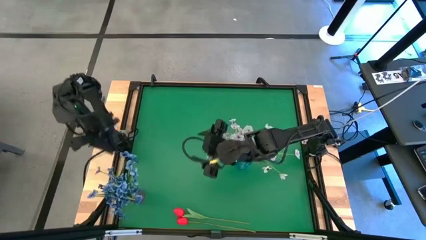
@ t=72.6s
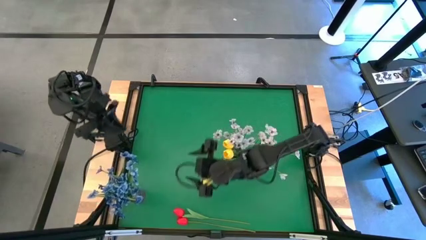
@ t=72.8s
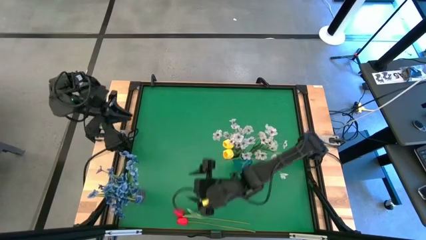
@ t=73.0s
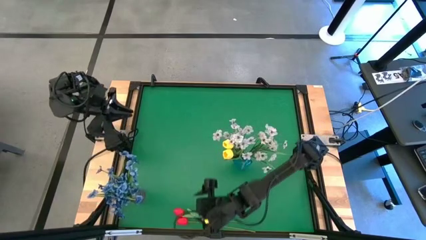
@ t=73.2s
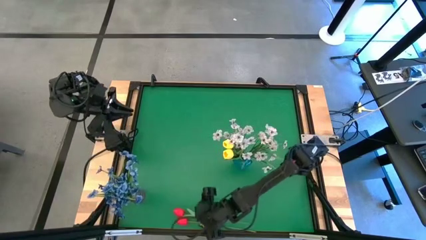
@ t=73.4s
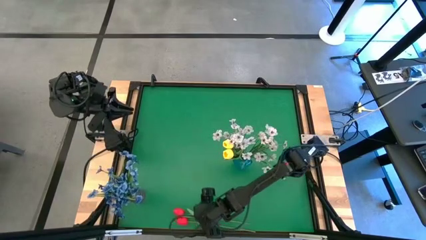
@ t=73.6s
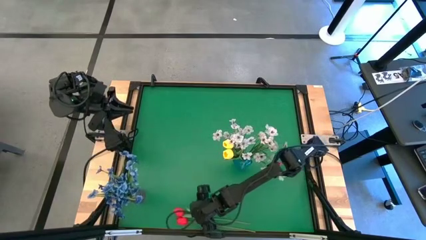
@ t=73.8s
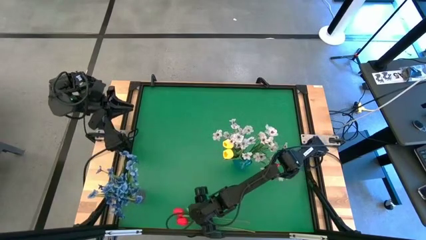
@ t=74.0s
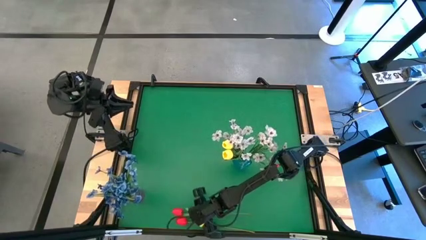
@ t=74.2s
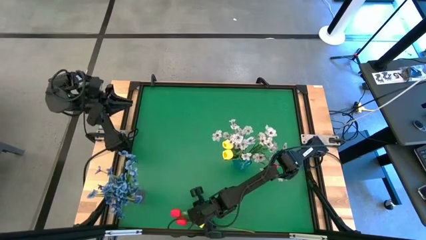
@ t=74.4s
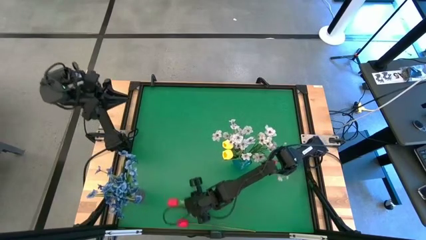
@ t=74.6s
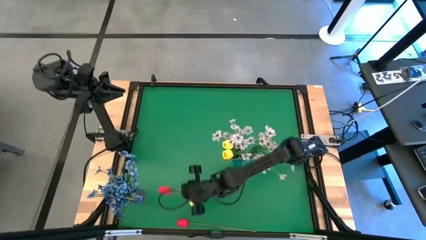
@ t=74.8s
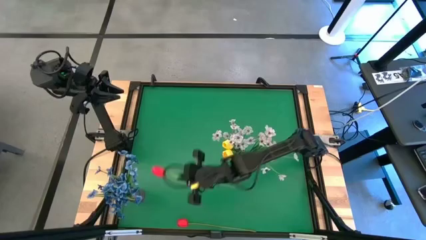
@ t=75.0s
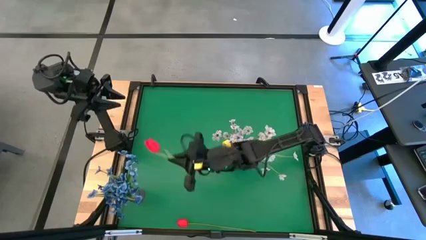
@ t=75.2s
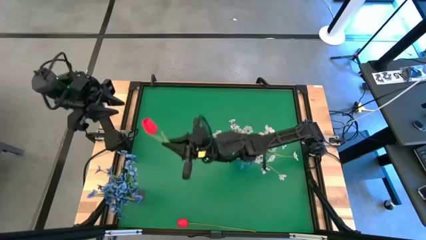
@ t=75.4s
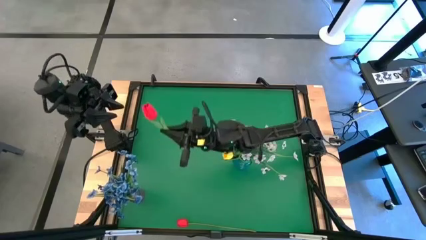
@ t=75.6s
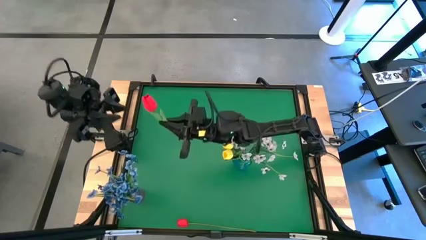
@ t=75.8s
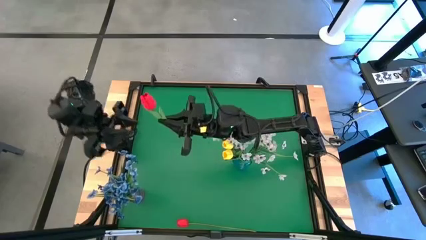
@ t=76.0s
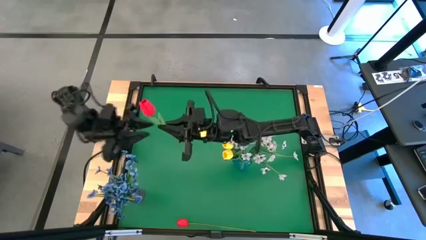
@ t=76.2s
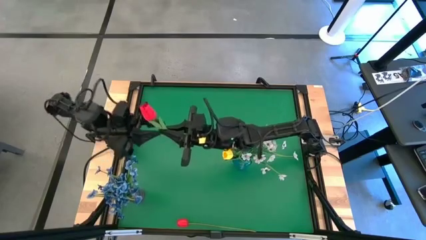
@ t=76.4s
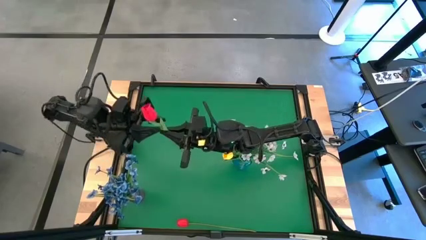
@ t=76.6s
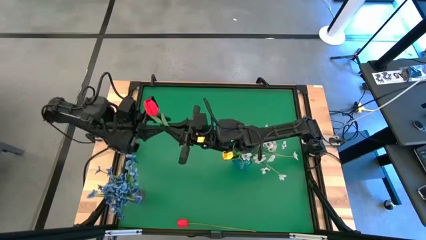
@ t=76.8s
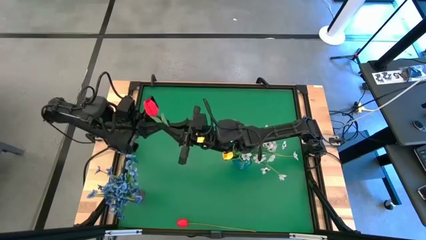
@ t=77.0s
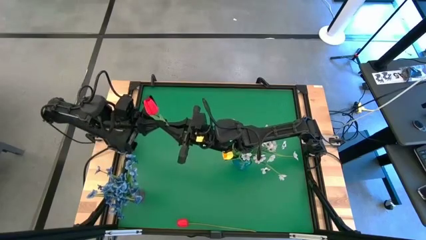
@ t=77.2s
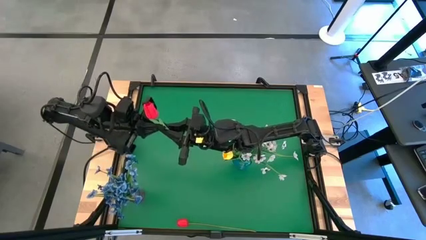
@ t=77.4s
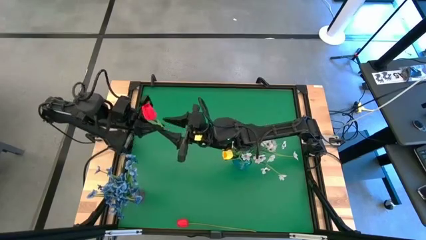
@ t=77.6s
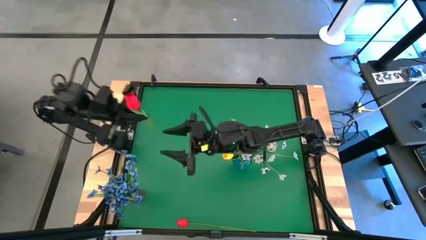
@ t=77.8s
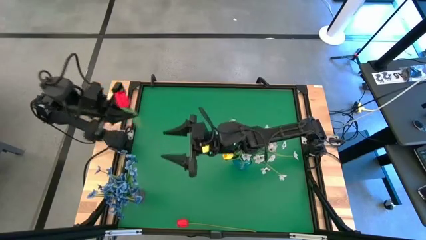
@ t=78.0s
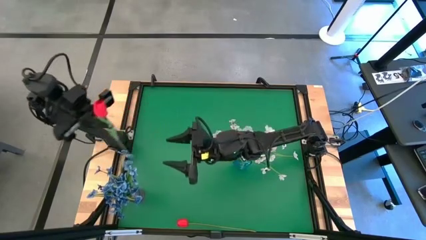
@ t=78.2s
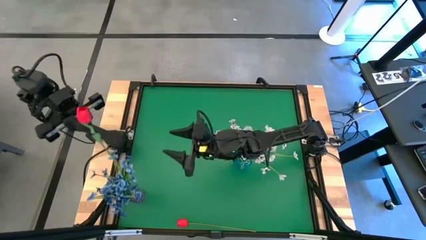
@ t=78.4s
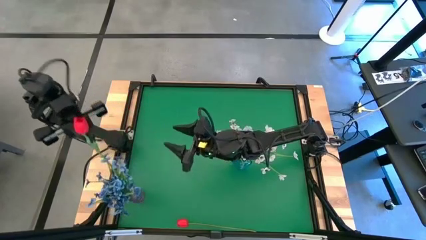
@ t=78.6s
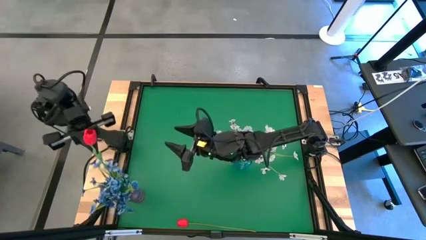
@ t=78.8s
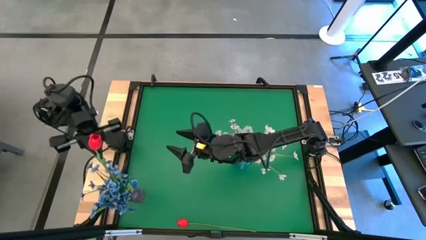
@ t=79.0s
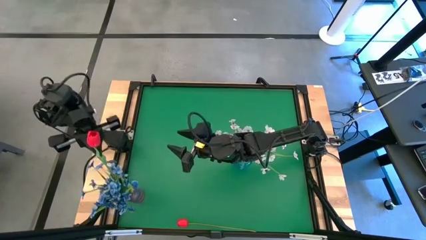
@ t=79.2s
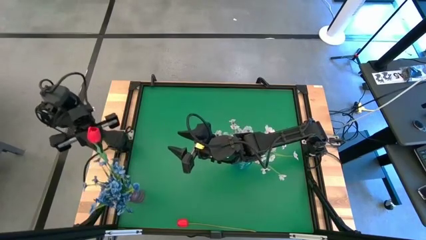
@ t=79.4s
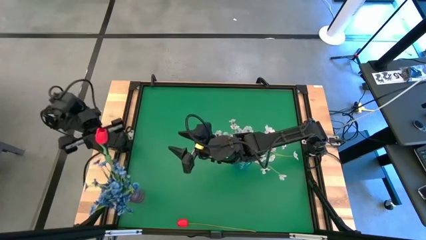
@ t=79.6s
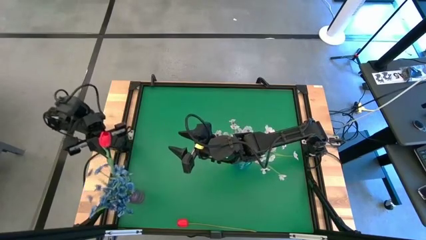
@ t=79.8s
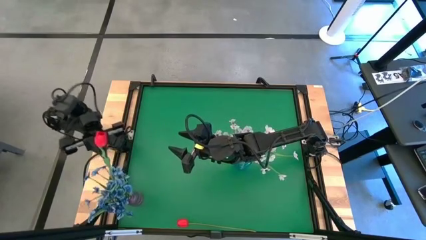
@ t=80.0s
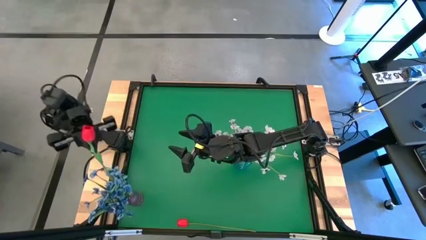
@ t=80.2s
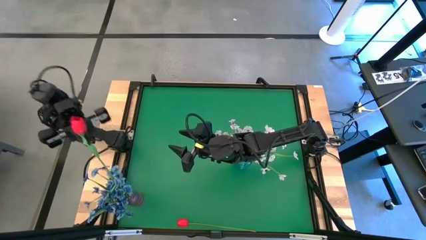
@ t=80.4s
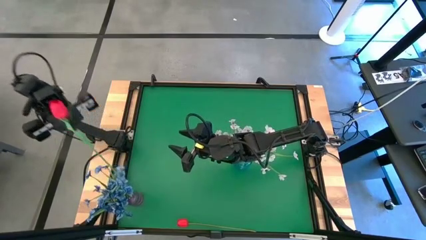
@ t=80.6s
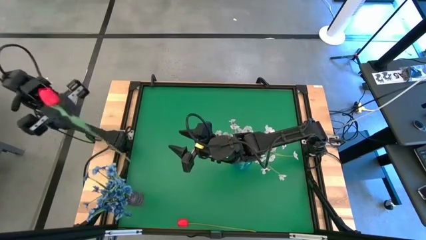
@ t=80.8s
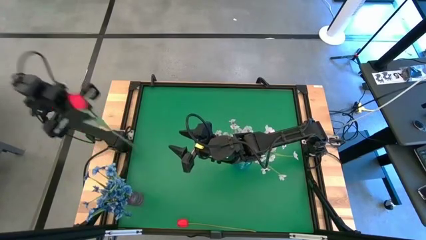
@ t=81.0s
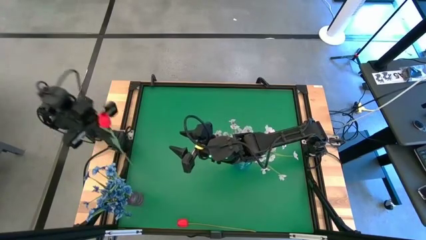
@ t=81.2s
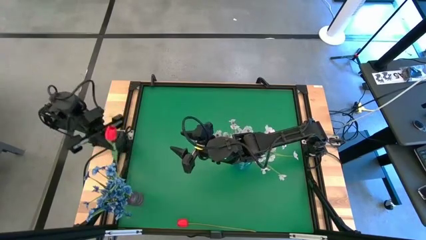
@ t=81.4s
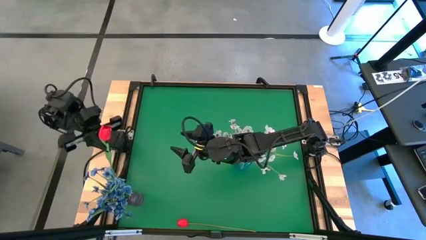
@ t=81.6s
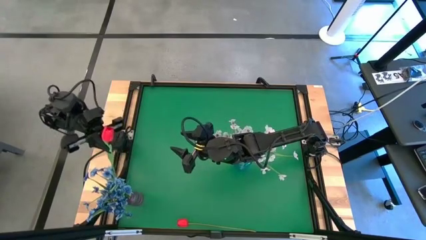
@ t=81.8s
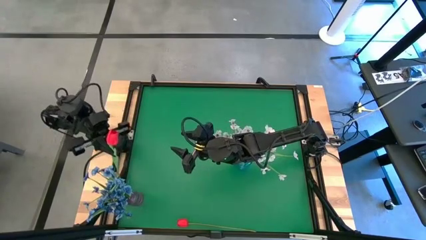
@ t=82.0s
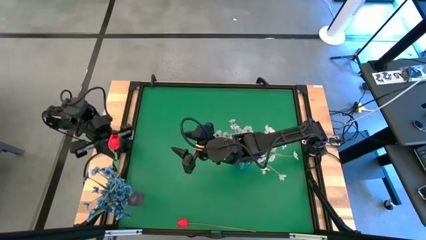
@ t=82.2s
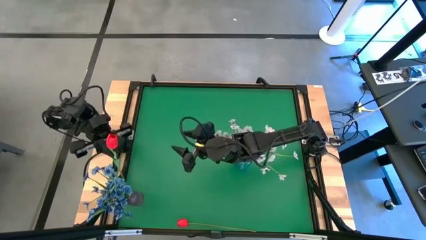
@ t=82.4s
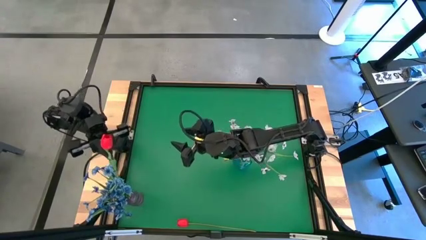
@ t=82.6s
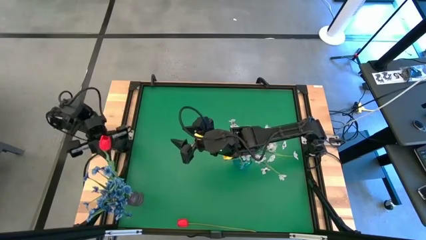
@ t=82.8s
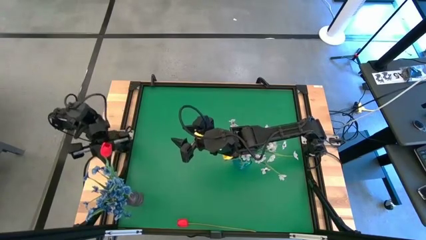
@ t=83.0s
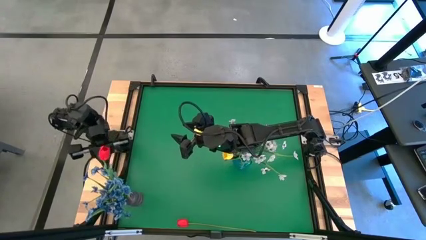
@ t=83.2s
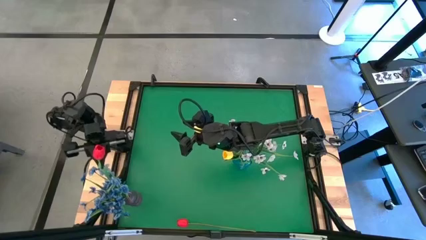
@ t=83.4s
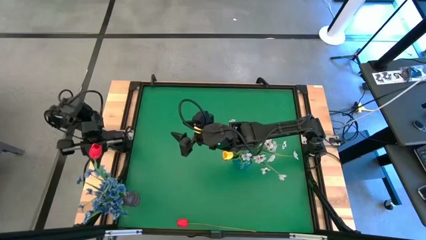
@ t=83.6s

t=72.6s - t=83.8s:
Task: Sort flowers into vase by color
Put the top red tulip into the violet vase

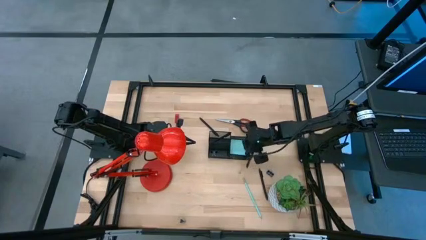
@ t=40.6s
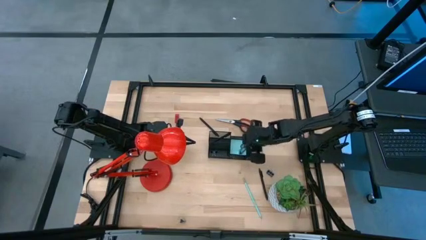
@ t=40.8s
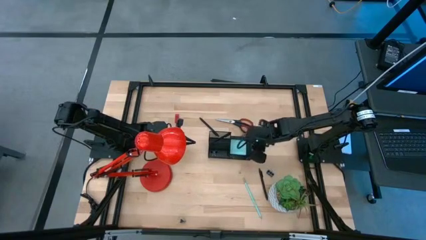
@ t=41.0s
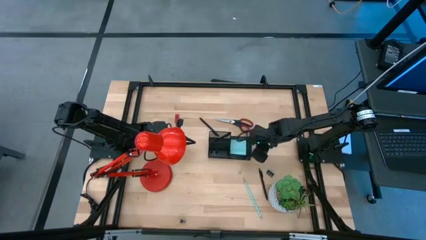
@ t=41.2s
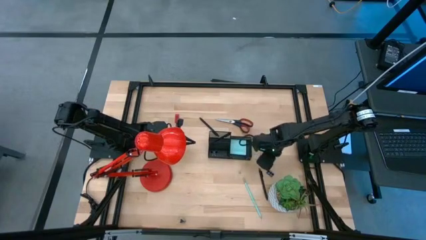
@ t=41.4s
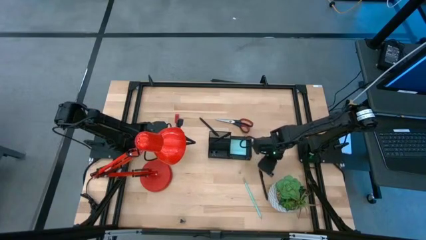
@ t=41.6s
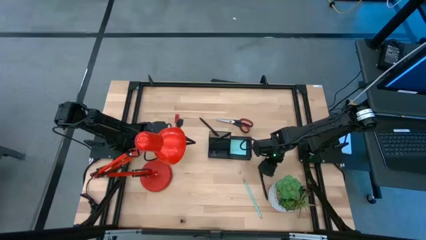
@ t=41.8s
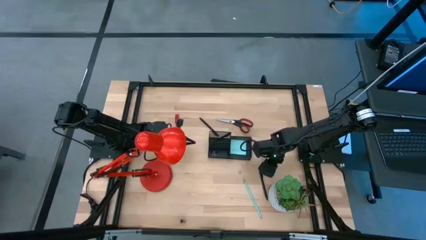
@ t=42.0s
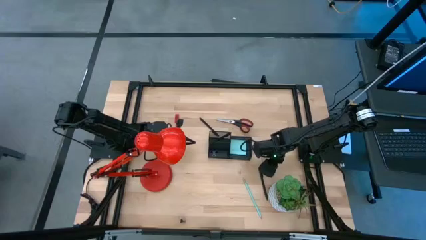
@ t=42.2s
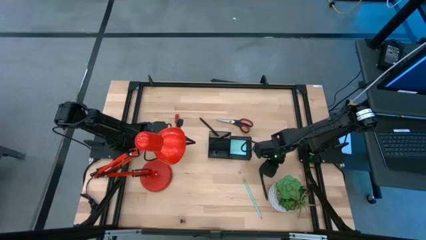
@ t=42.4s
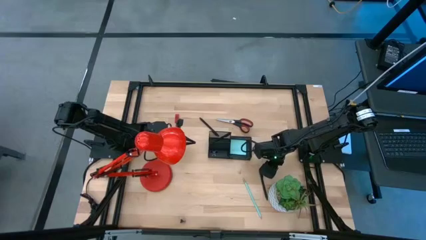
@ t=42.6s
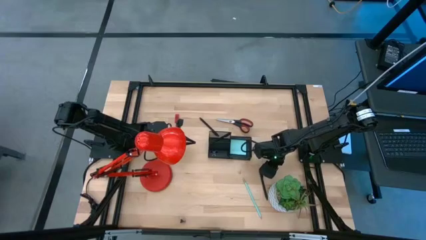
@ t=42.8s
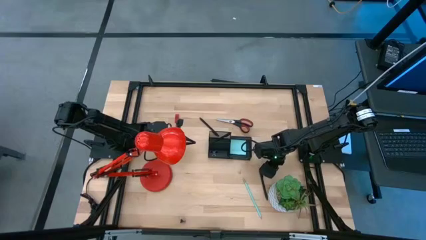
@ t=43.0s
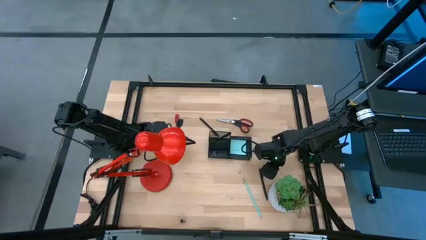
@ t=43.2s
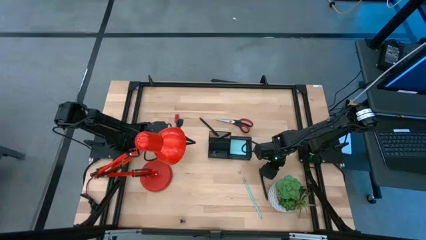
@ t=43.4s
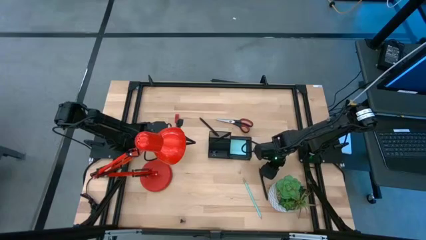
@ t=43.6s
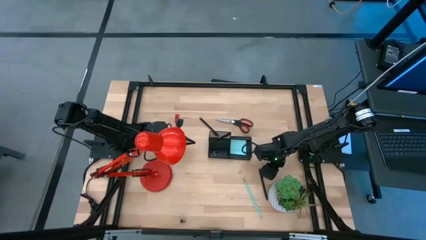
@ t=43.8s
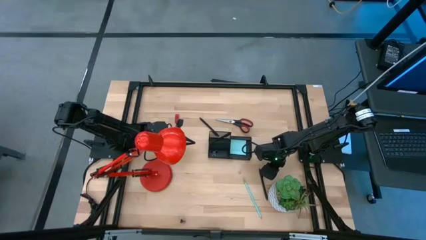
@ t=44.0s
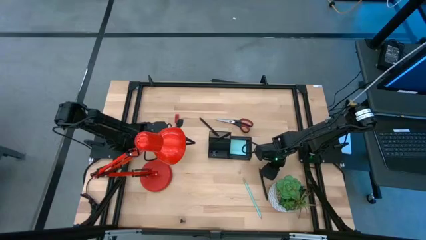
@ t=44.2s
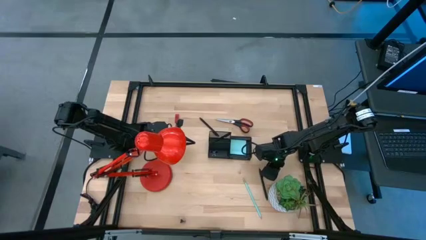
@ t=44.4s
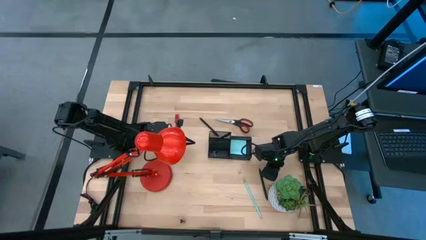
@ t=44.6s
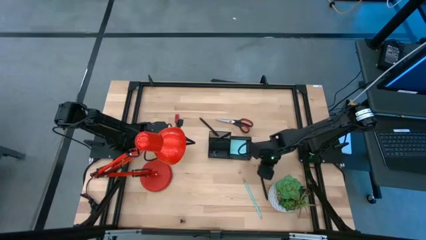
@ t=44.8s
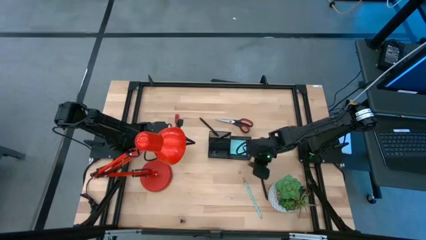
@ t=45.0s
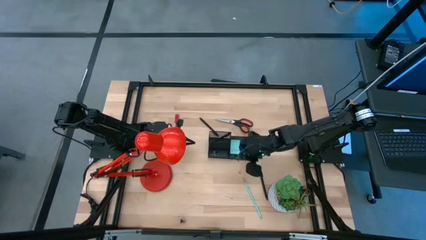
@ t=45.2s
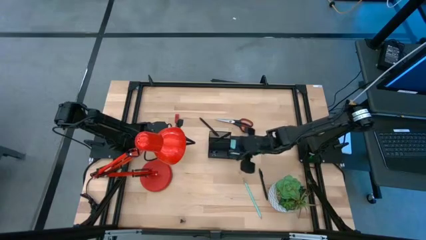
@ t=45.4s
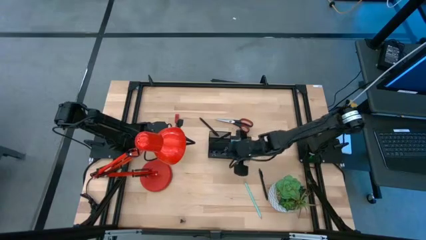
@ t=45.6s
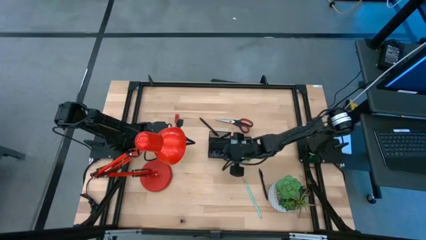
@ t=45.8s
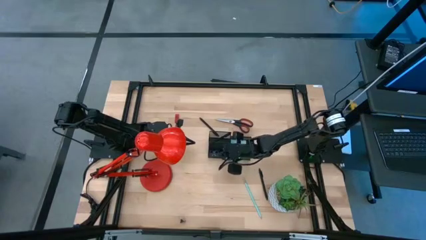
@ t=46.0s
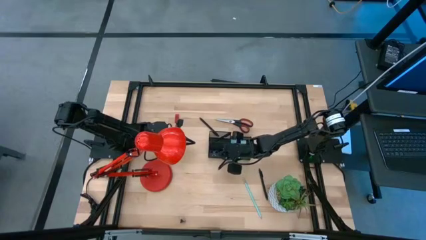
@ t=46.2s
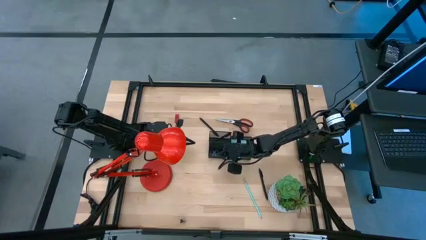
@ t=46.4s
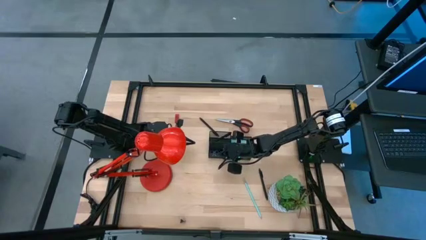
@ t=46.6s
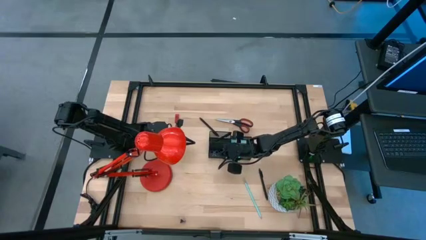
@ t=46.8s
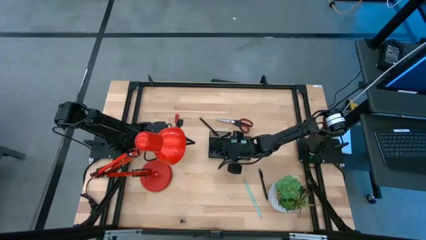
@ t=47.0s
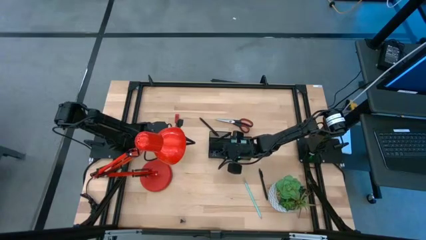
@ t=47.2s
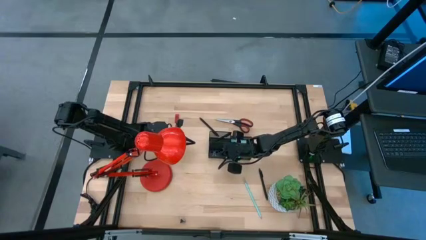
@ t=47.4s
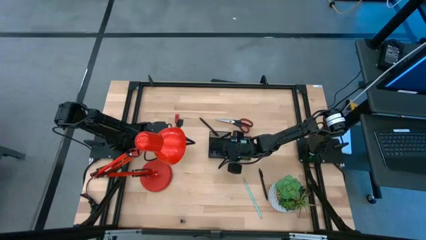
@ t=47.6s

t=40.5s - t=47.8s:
Task: Pick and place office supplies into organizer
Put the top black binder clip into the black desk organizer
